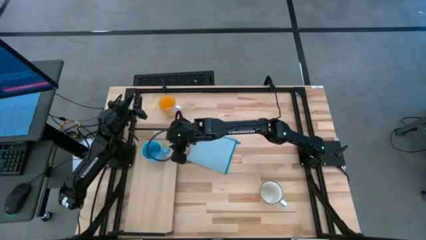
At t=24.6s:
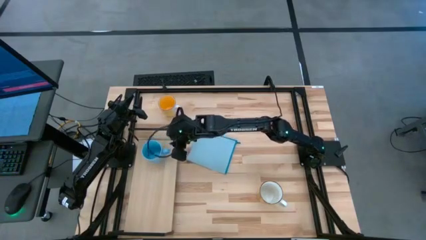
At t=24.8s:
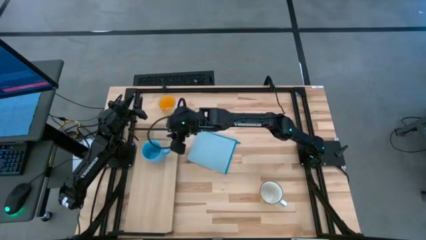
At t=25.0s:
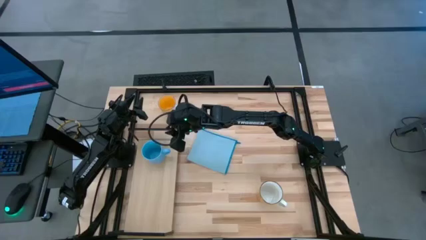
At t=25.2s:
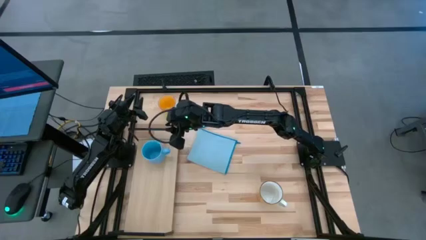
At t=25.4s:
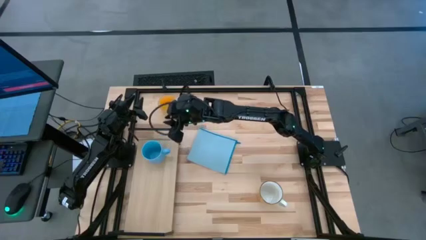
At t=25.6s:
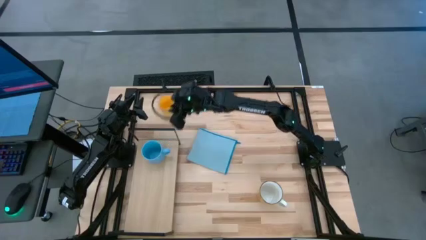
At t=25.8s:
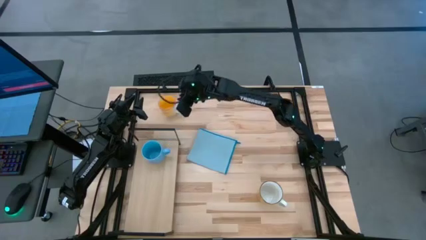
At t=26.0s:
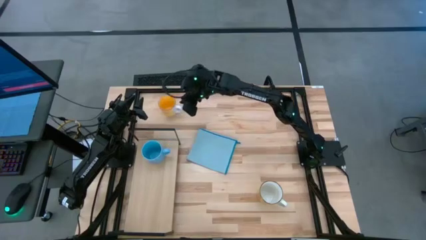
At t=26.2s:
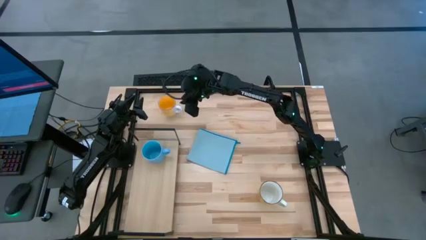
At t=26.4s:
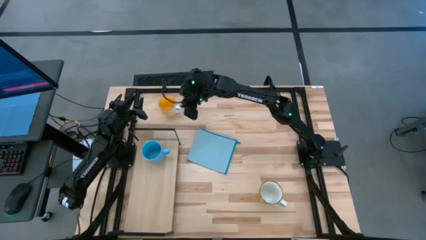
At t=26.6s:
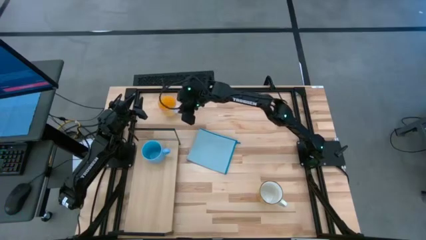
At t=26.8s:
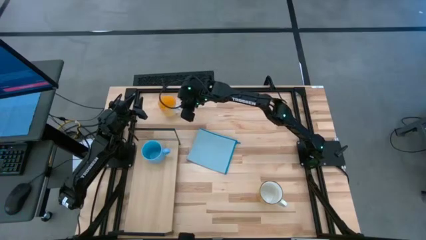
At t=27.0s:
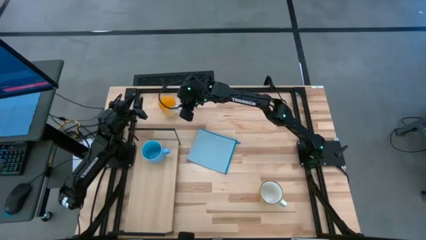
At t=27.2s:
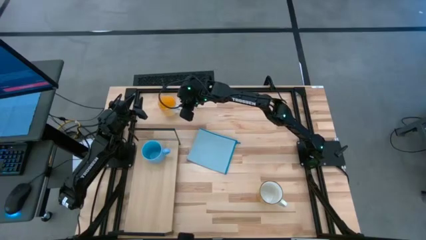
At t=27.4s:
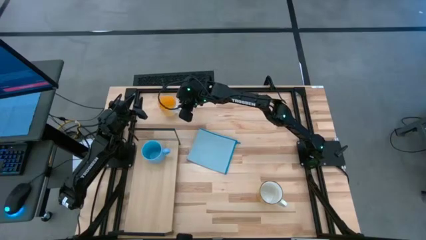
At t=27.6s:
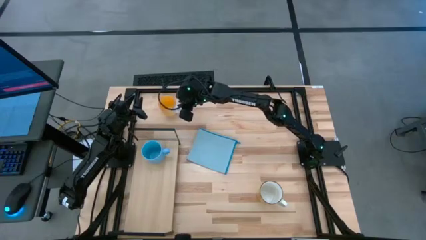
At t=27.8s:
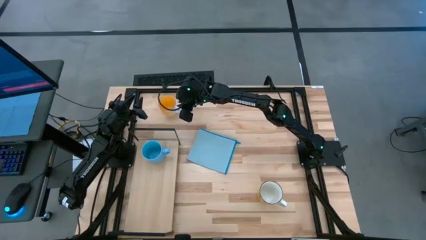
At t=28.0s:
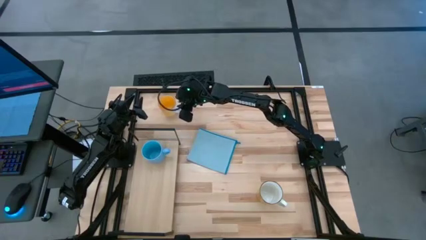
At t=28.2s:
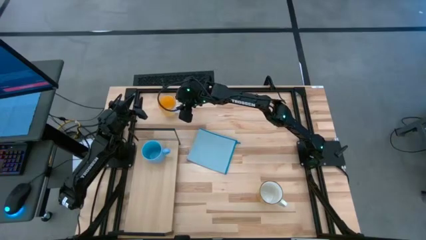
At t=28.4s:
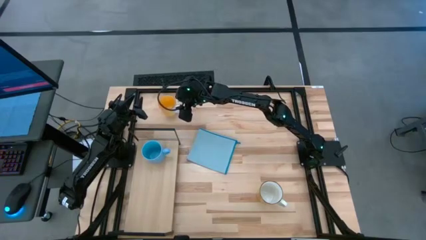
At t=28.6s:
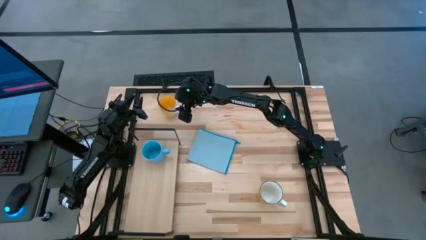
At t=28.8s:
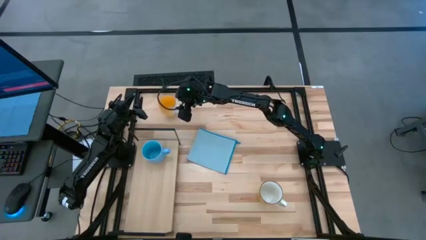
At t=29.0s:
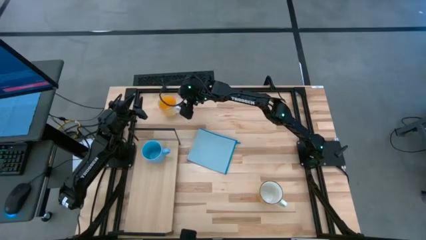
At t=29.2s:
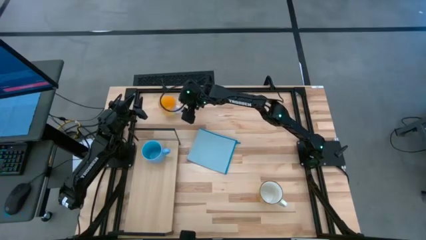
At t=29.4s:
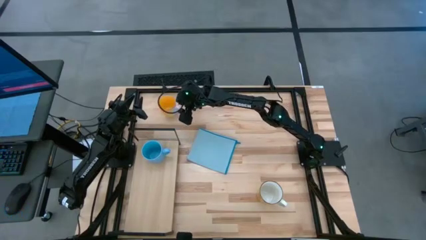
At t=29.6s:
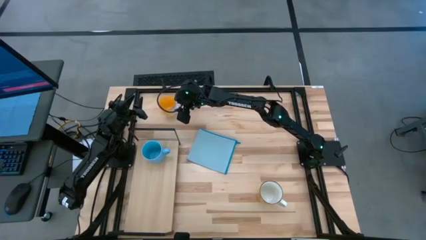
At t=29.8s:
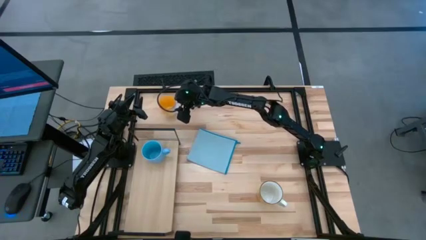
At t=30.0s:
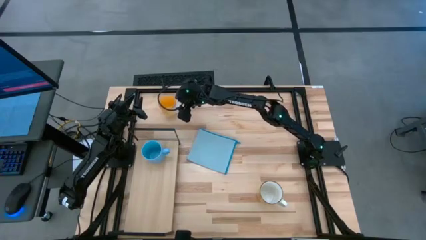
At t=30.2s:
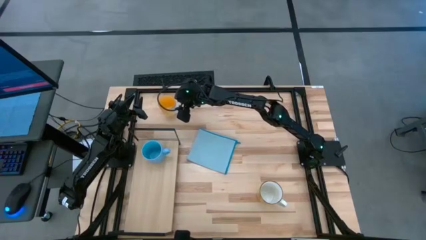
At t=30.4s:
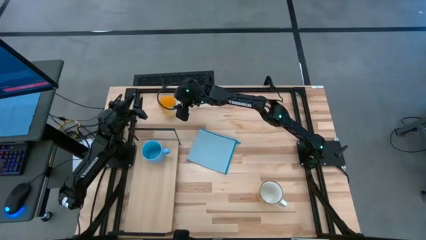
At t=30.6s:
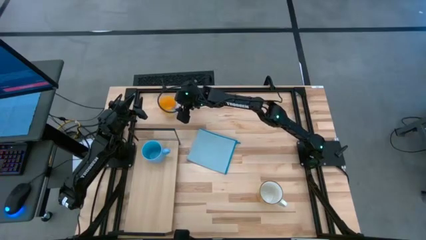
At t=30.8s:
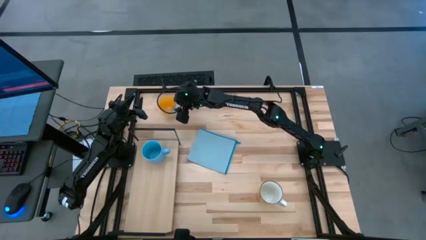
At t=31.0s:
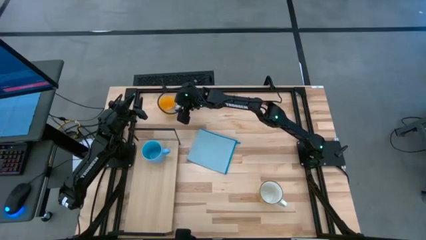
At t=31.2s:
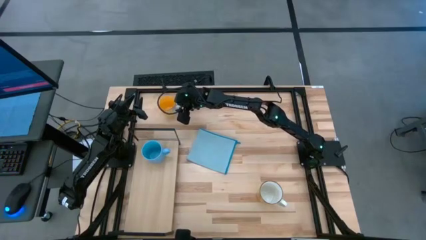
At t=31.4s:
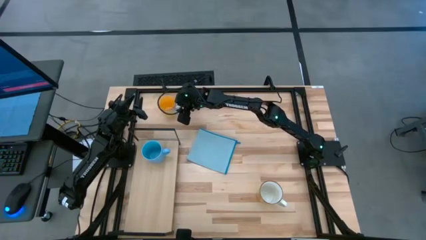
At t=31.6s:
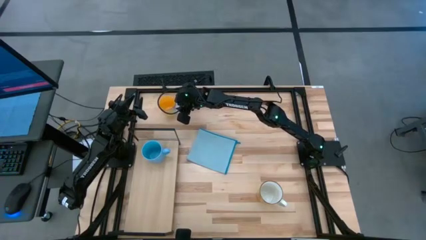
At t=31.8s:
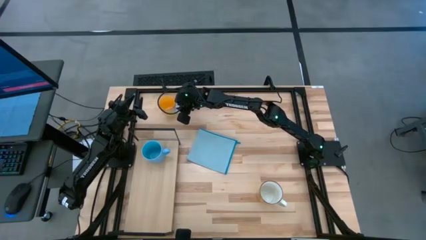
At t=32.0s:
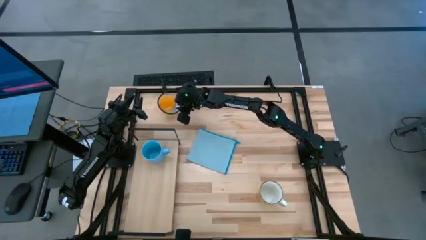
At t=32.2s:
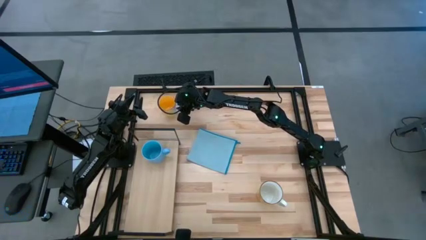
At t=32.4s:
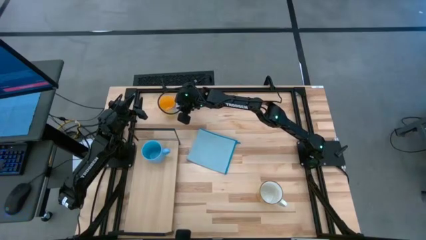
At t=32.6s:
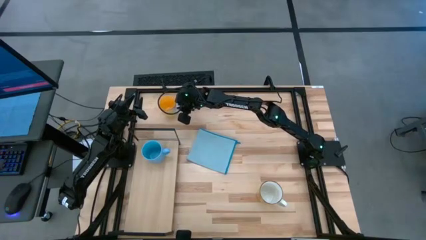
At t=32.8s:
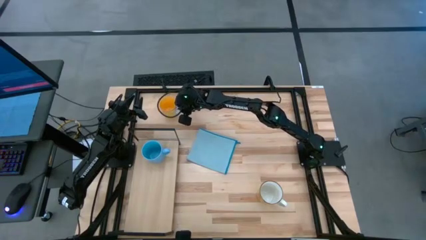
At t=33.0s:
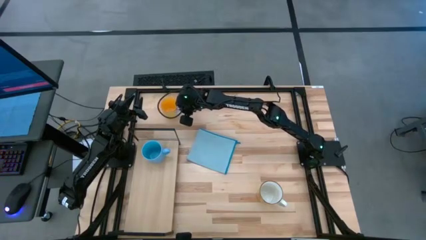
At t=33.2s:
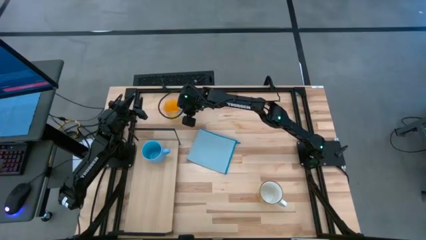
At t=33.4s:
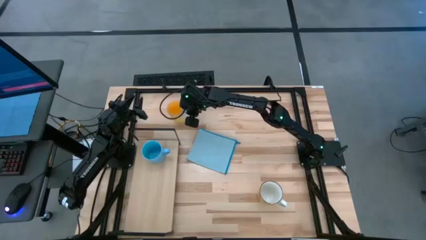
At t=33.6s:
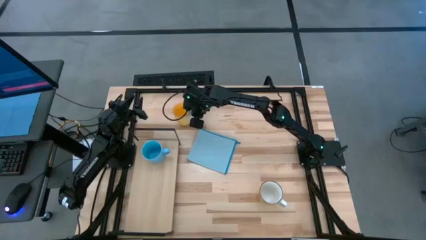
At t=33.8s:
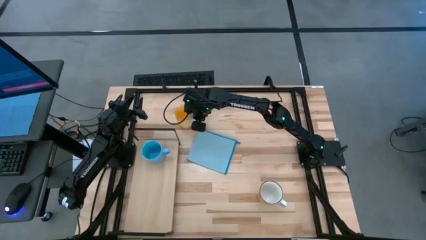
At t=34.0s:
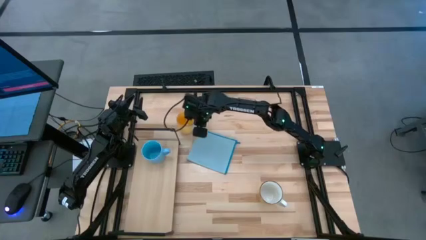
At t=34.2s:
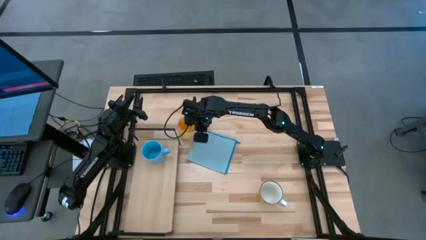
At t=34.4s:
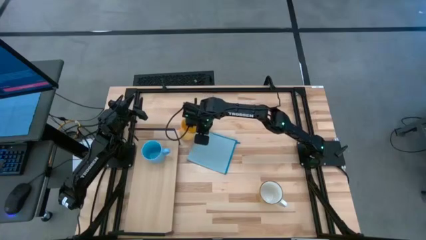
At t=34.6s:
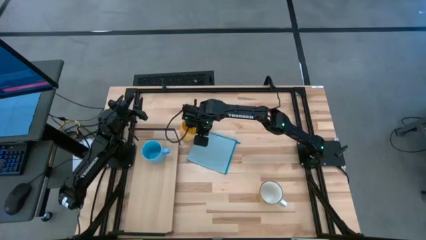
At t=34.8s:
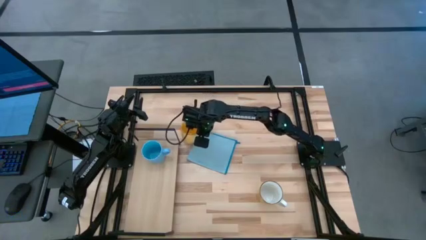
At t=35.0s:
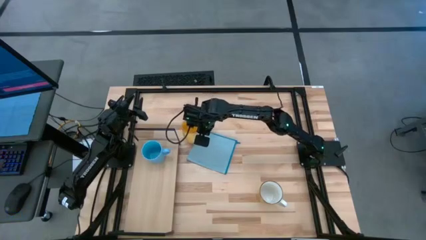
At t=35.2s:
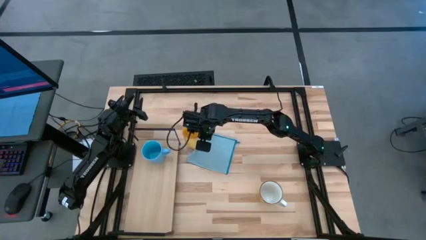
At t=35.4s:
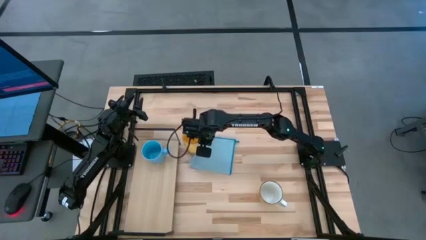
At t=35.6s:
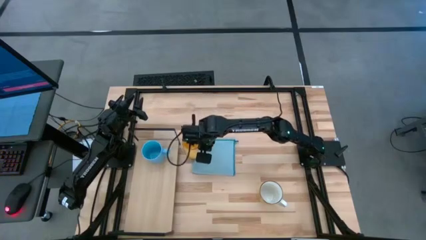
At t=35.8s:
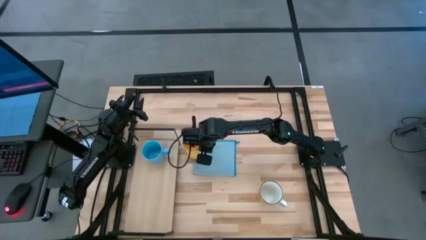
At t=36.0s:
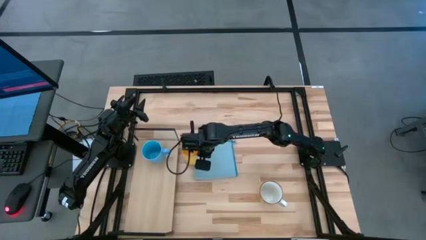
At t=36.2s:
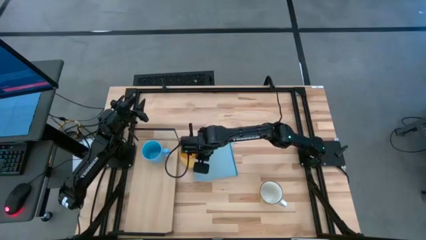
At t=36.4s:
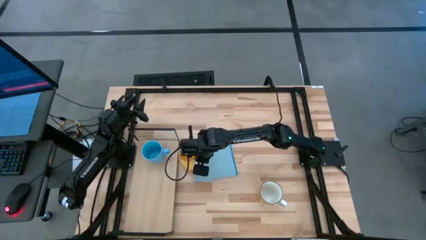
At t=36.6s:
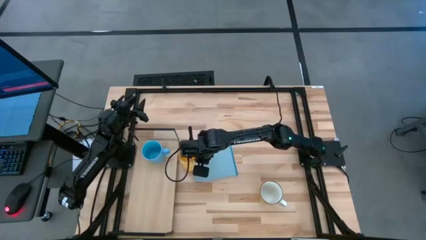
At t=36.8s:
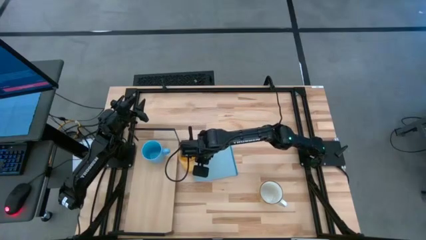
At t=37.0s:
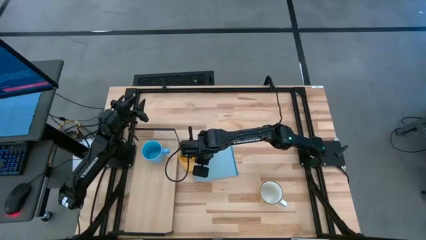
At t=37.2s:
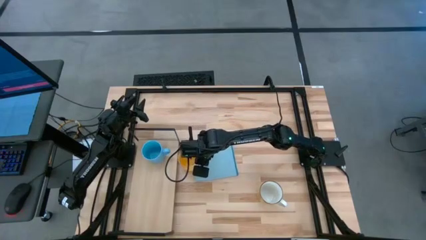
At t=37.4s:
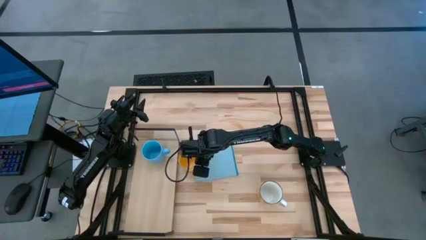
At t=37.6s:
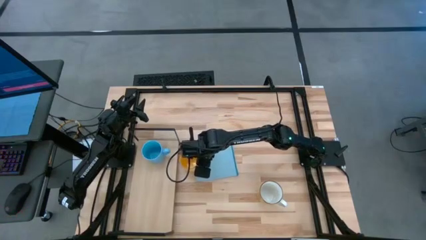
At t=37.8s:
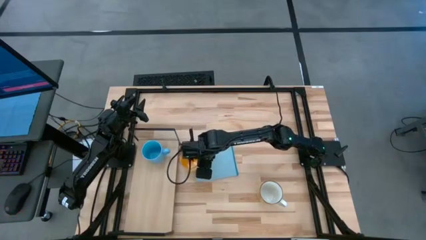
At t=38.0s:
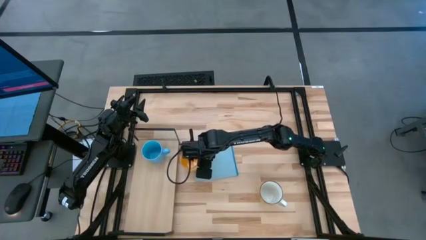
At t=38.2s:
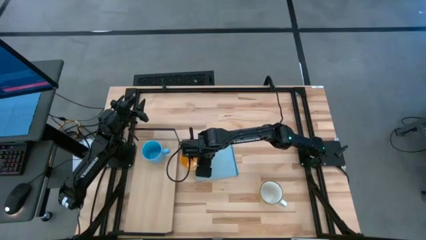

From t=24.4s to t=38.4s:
Task: Stack small to large cups/mugs on shelf
Put the yellow mug on the shelf
